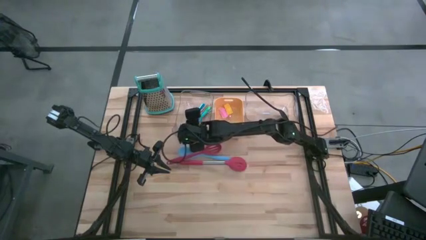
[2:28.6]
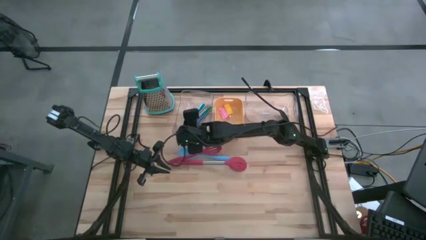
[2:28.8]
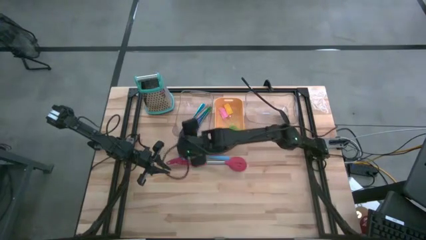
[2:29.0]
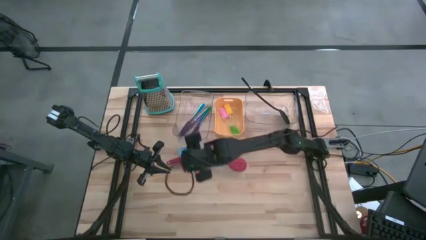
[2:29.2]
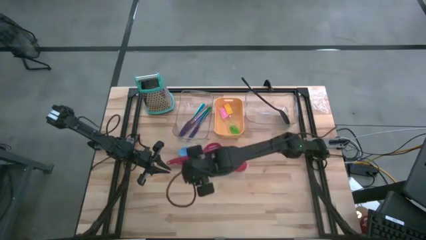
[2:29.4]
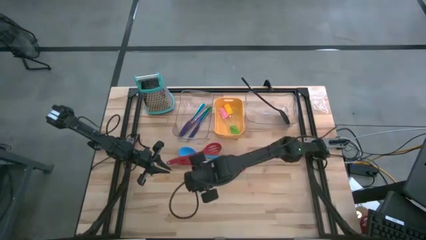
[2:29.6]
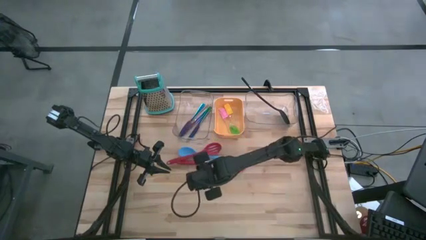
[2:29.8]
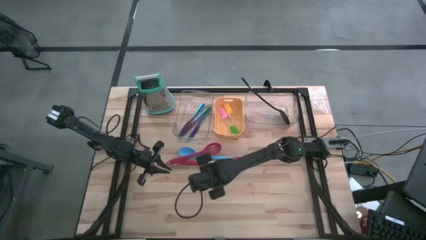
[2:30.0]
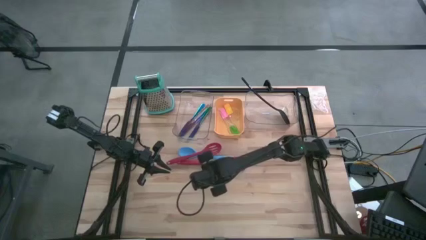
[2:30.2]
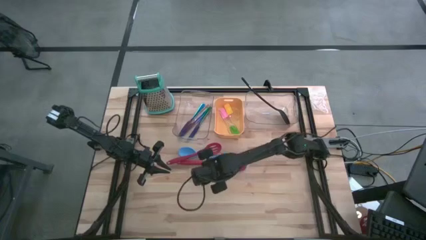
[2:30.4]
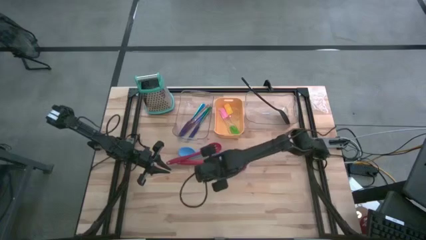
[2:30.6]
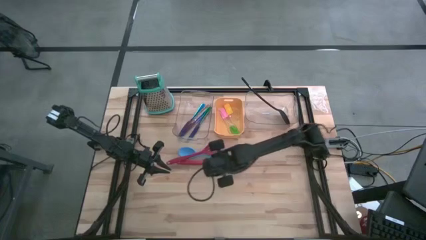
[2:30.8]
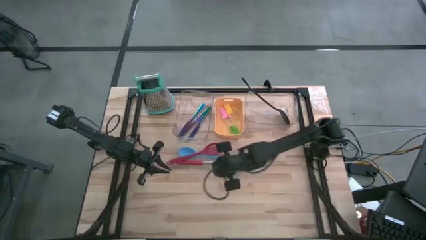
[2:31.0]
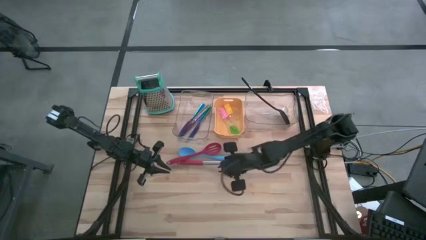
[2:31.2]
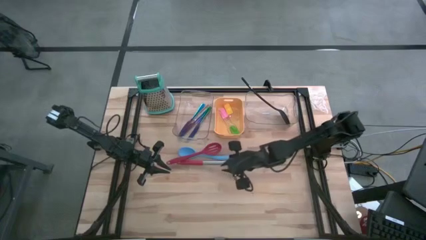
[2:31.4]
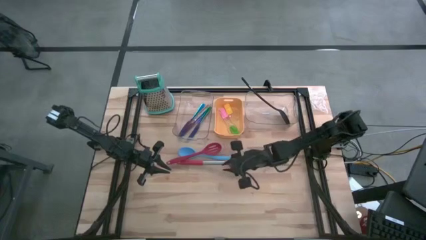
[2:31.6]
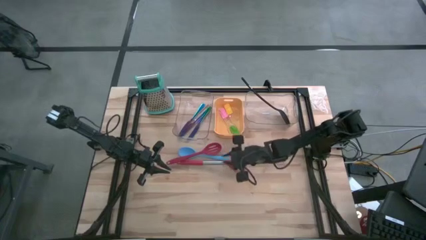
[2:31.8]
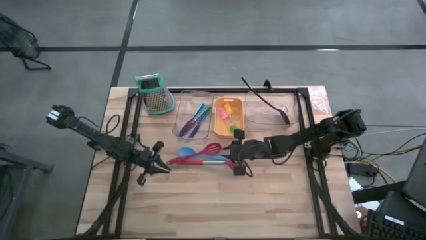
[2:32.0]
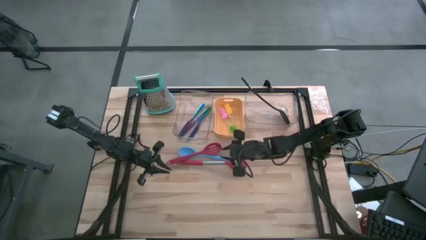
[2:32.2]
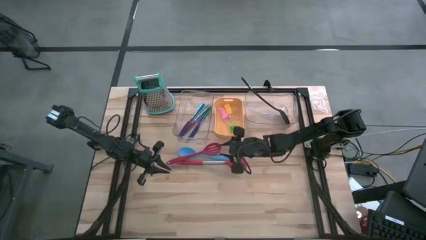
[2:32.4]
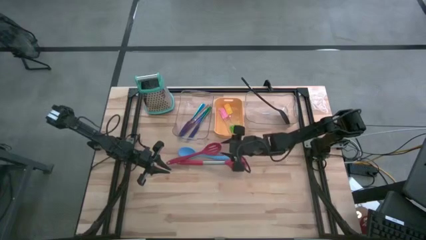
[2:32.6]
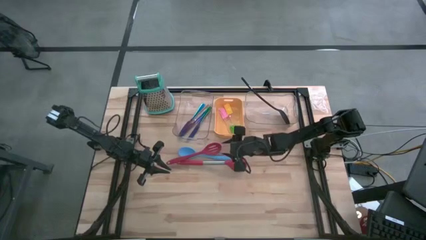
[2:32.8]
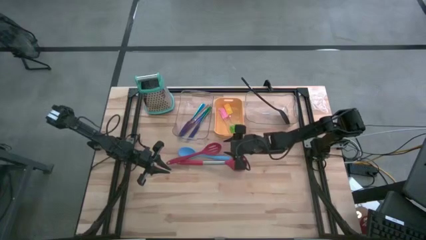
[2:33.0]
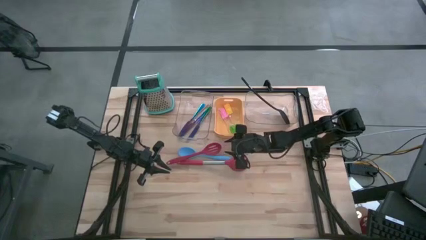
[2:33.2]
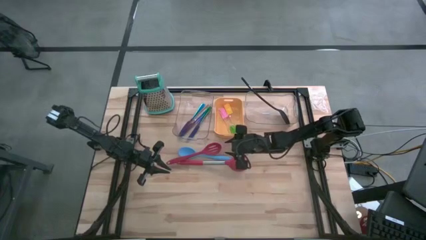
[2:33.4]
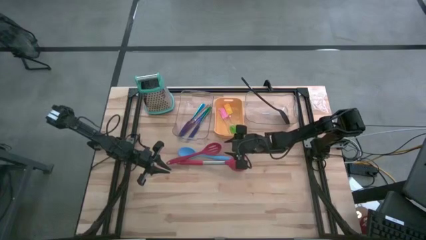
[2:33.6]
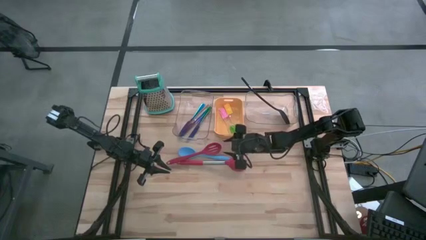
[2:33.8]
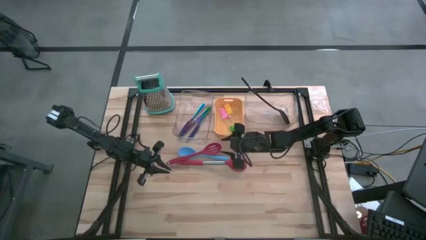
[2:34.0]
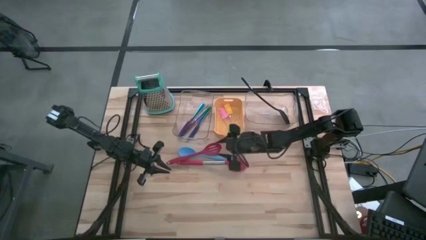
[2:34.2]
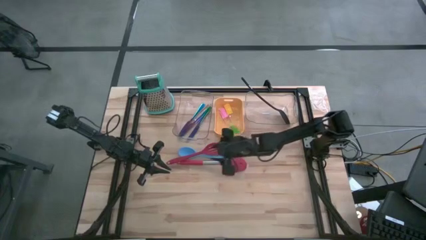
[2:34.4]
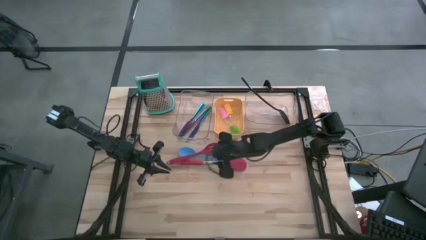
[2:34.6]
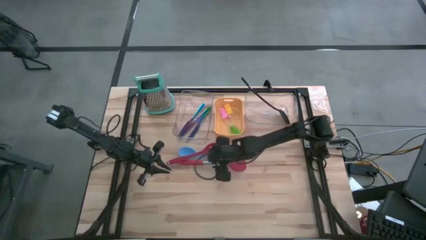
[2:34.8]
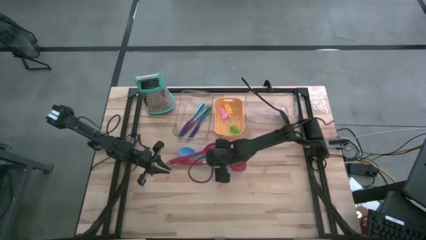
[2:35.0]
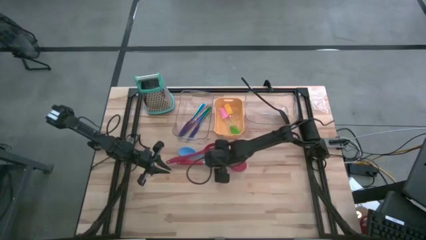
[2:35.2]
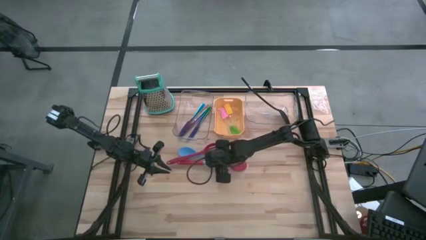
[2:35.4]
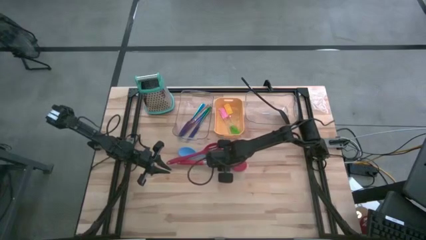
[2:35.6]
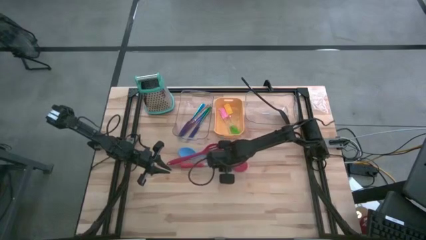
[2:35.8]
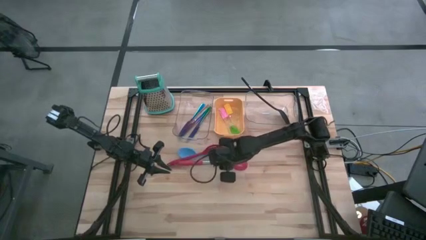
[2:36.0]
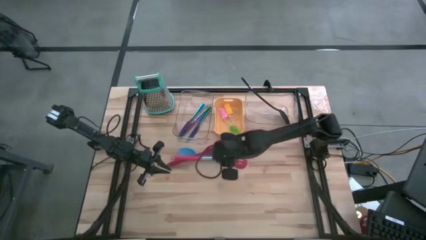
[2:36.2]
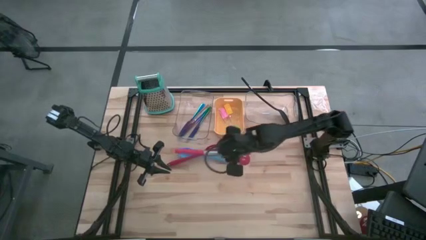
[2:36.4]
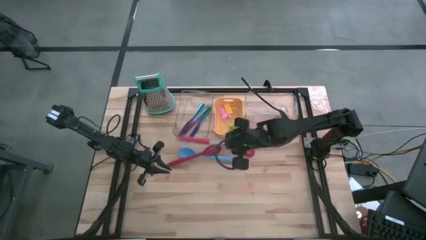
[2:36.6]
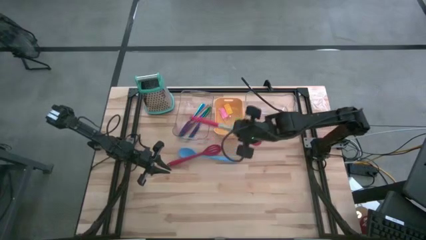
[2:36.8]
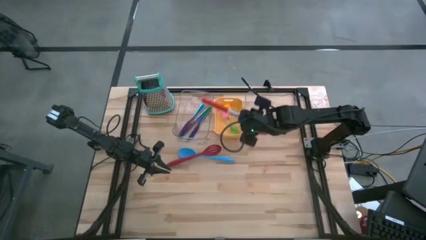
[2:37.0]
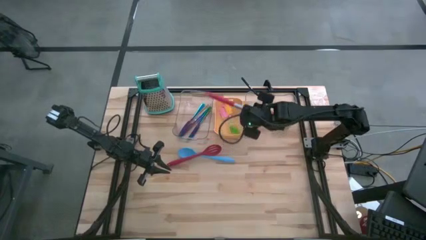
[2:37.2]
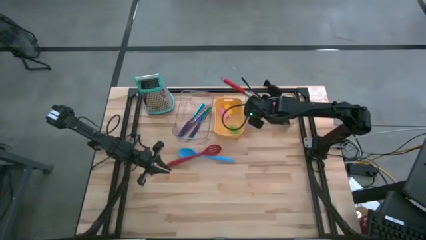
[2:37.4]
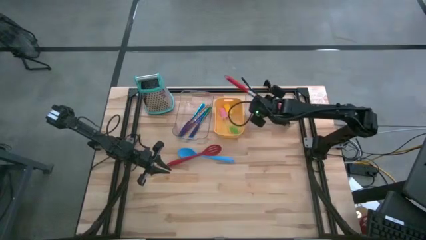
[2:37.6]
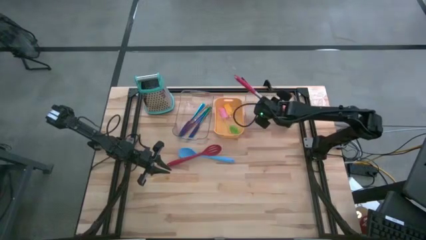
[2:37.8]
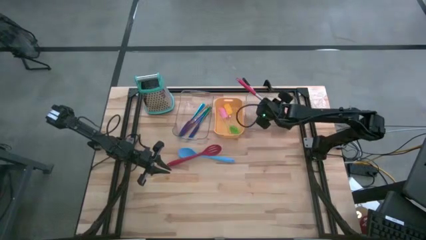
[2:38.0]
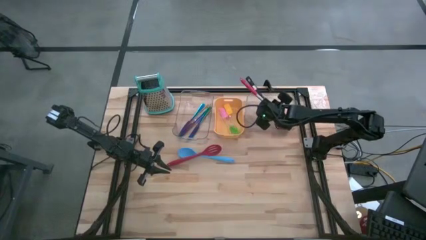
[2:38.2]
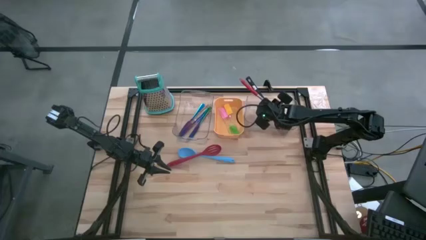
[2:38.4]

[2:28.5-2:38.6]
Task: Pick & Place Kitchen Items
Put the bottom red slotted serving spoon into the right transparent bin

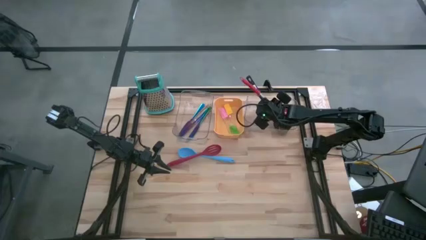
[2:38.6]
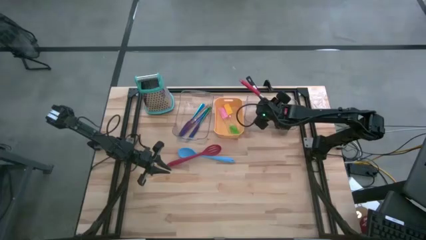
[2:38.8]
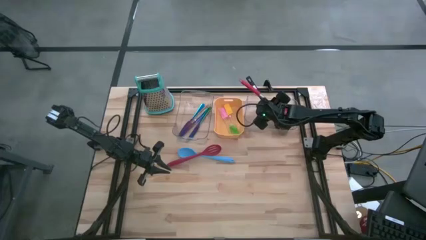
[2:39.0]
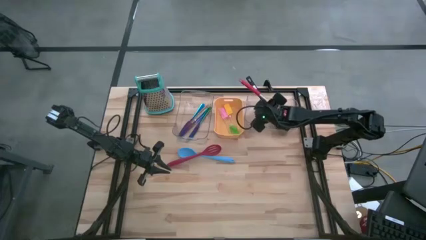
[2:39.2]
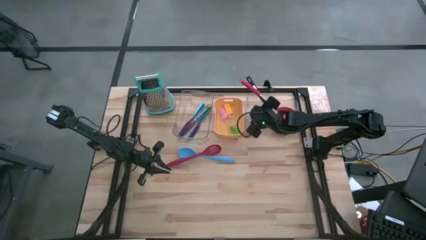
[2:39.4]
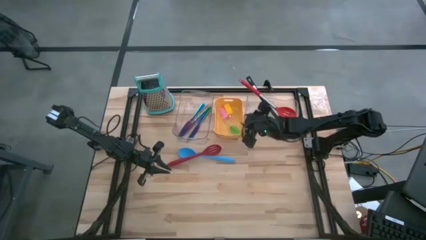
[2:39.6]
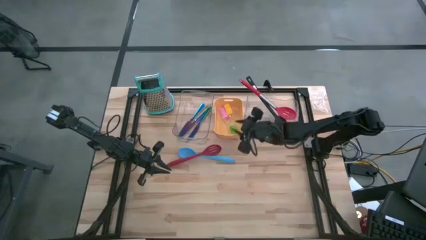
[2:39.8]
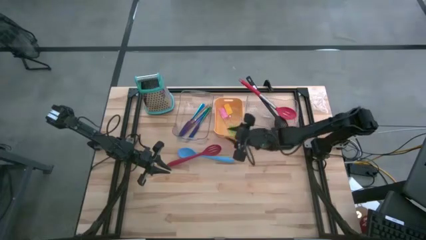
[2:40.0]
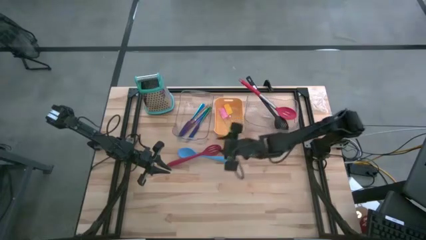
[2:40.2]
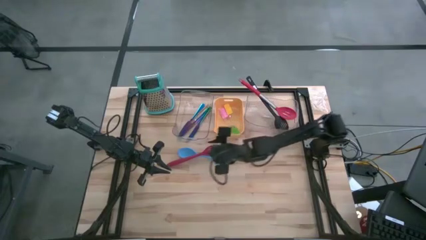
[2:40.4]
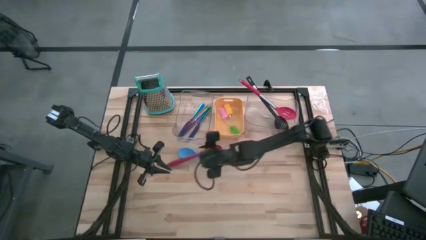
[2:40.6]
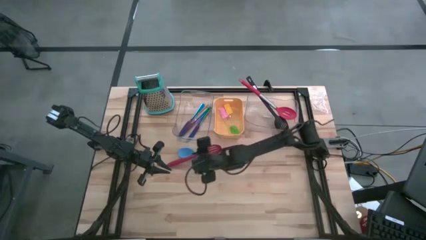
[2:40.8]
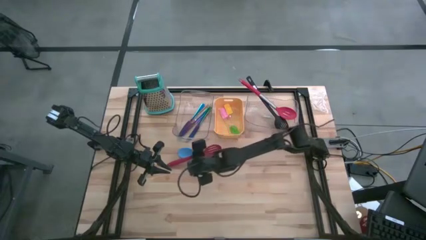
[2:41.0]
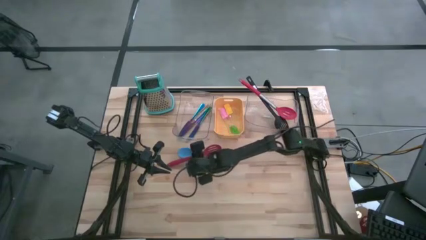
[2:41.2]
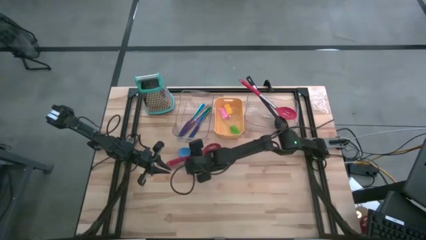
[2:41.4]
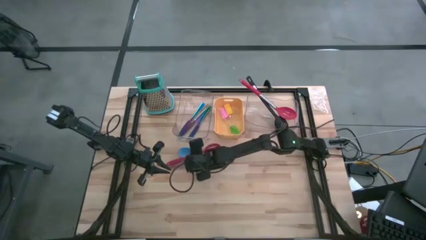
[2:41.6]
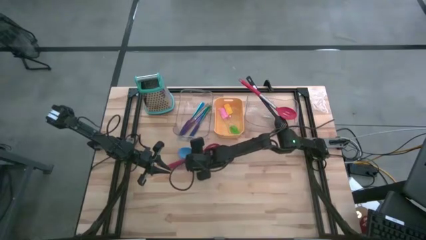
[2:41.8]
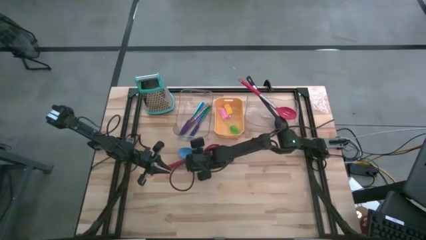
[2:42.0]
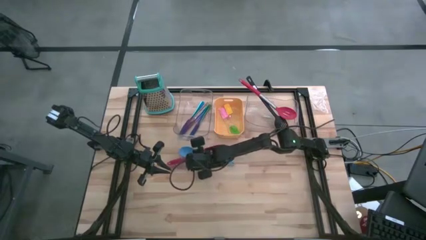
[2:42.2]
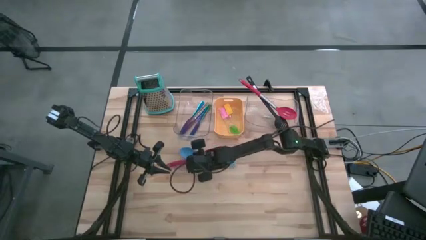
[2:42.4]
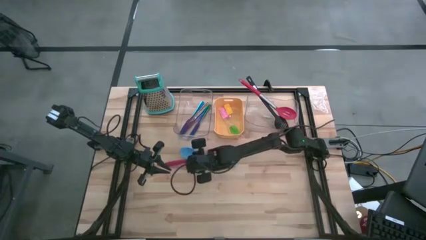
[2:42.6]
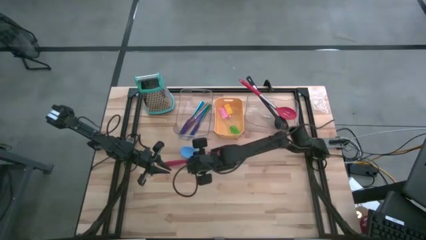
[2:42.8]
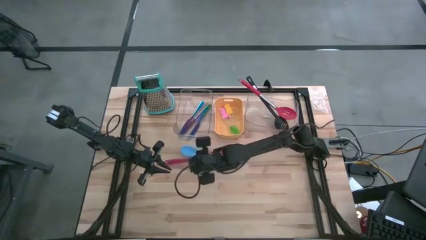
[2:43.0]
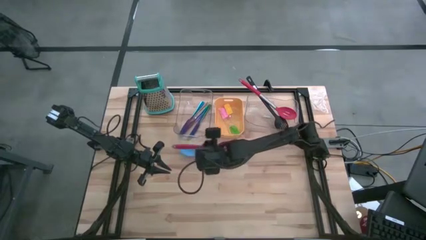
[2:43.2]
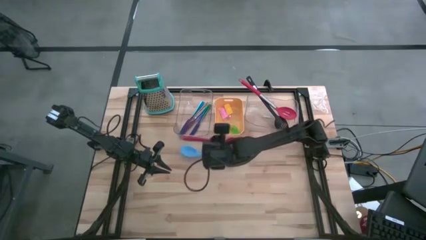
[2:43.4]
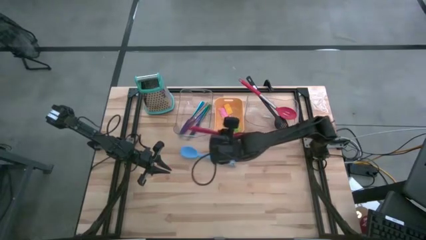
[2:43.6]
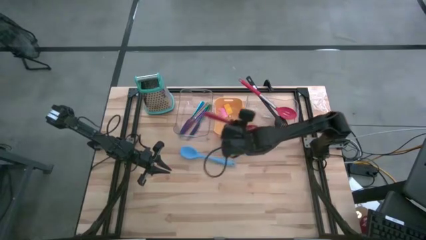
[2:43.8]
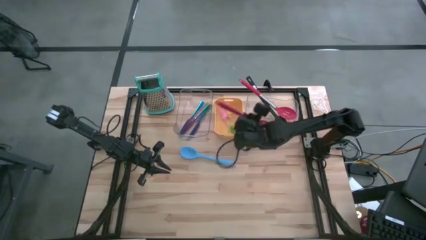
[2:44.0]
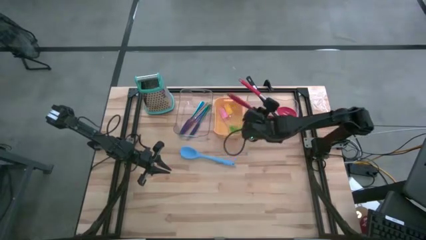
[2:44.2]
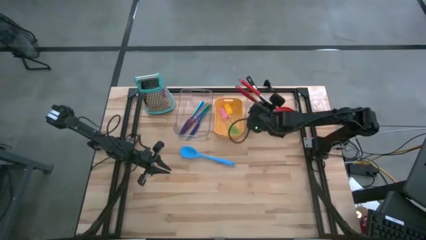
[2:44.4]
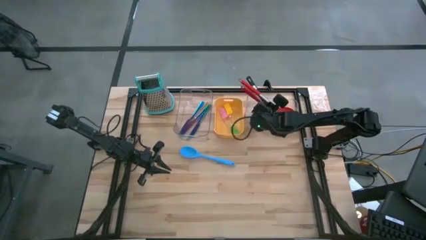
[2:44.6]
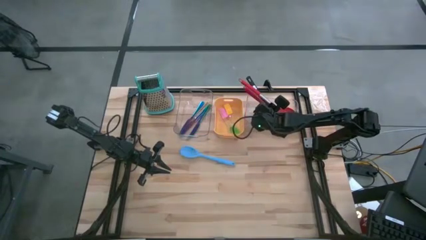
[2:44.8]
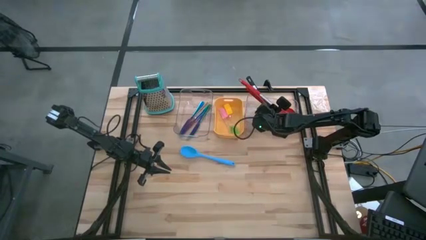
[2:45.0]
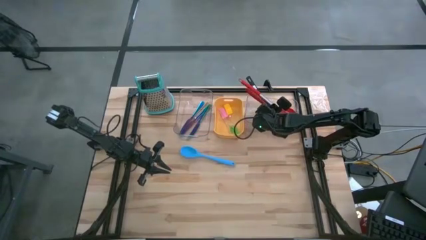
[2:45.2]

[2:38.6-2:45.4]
Put the red slotted serving spoon into the right transparent bin
